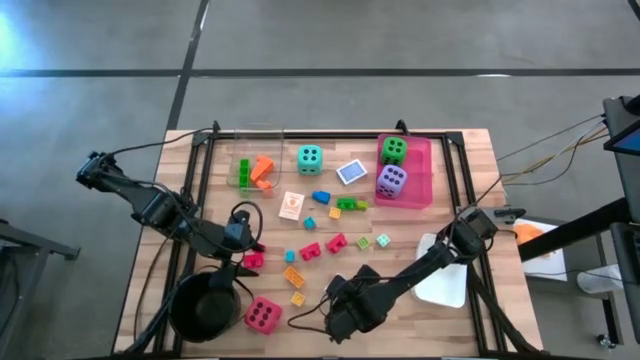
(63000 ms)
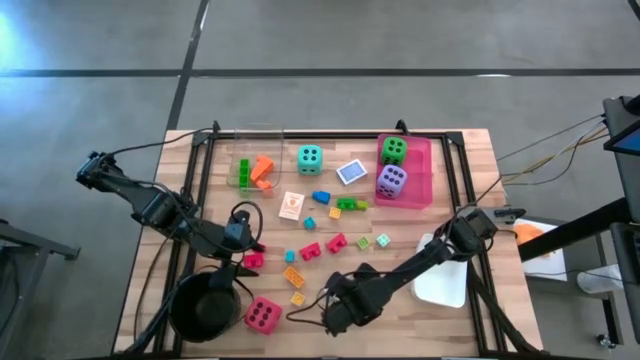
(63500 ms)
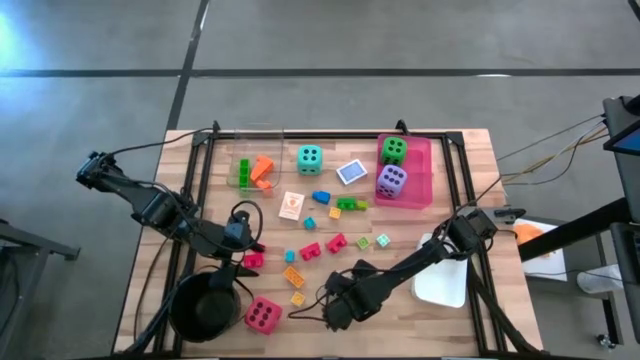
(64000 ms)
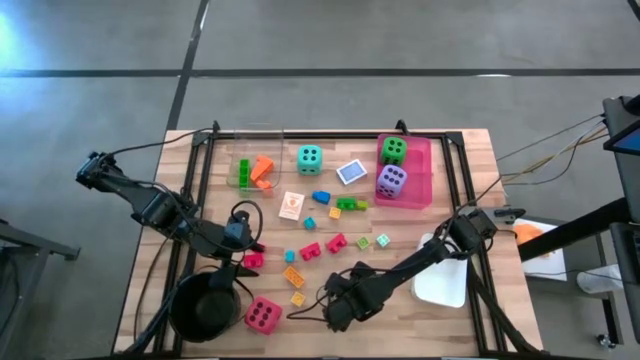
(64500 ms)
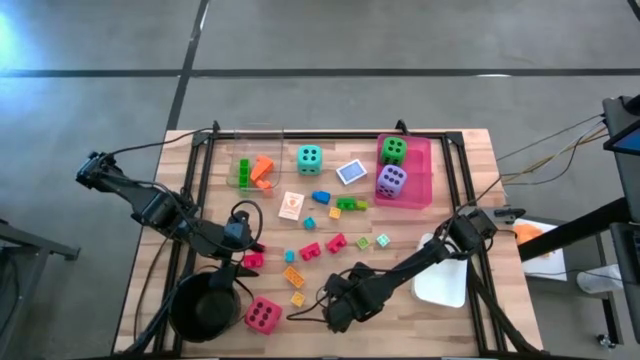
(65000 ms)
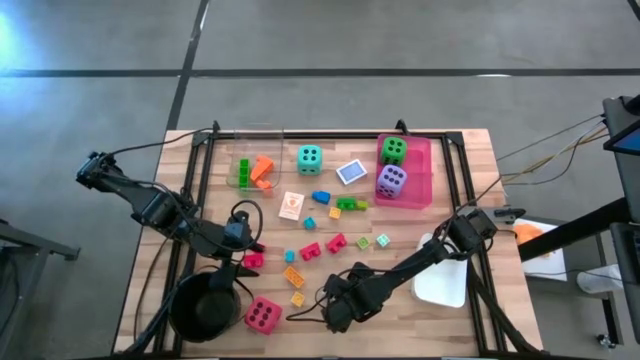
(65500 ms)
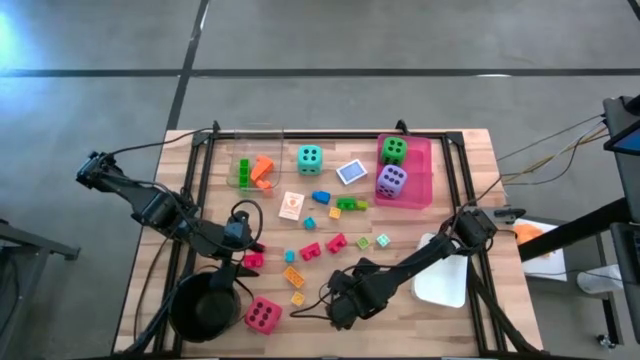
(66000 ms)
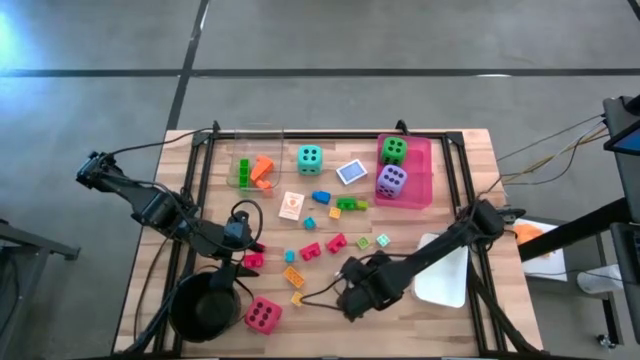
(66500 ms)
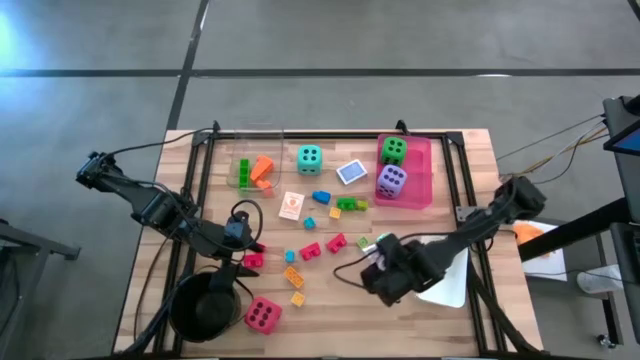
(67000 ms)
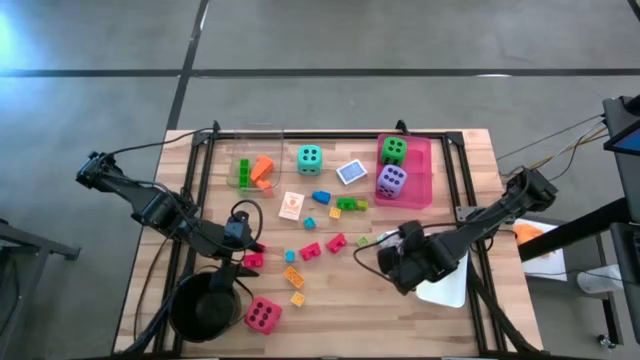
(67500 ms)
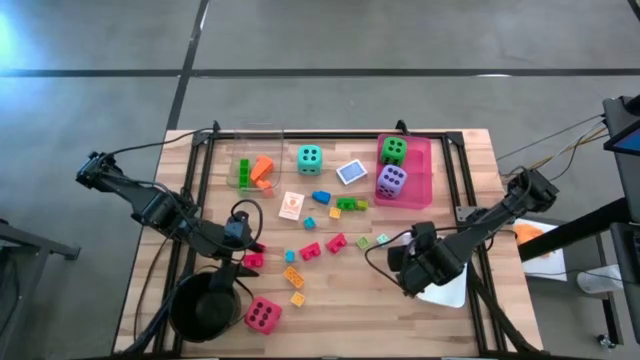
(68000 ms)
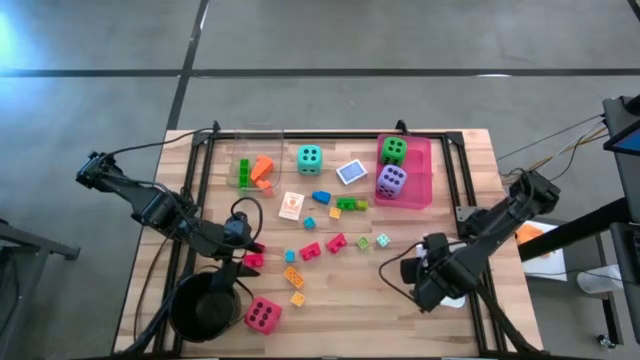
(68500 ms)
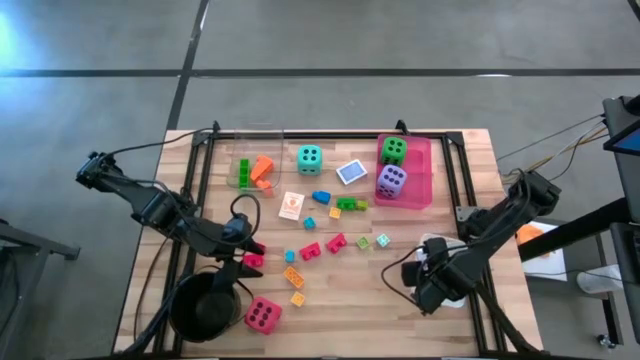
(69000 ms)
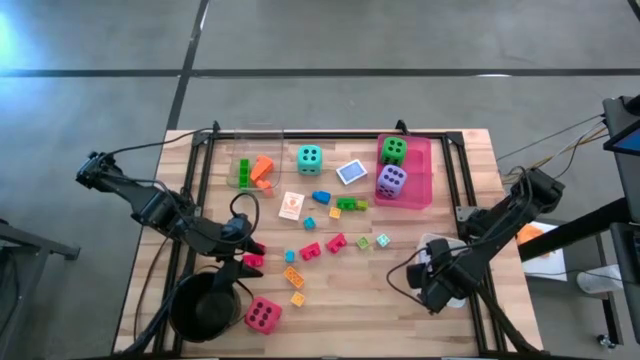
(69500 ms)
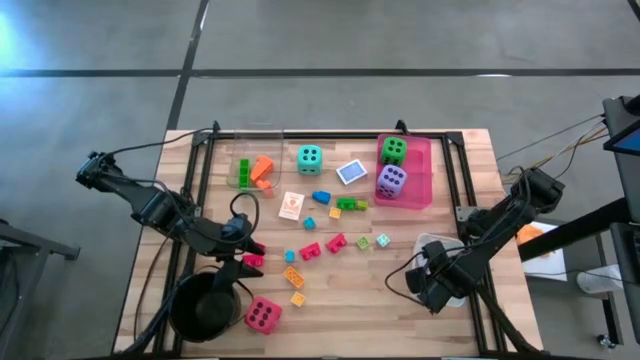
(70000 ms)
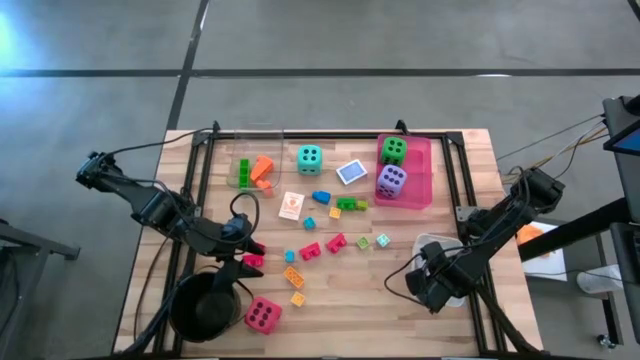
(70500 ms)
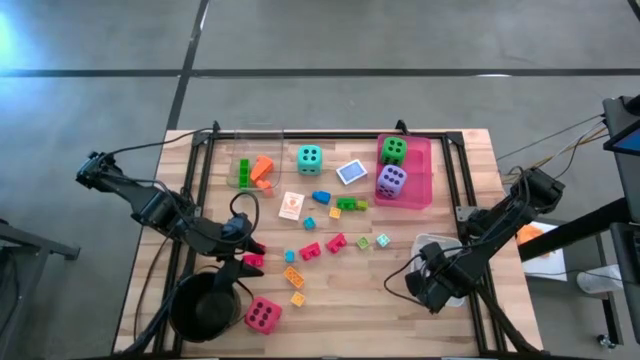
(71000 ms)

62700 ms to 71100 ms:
Task: Pick & Place Toys
Put the purple deck of cards into the white bin

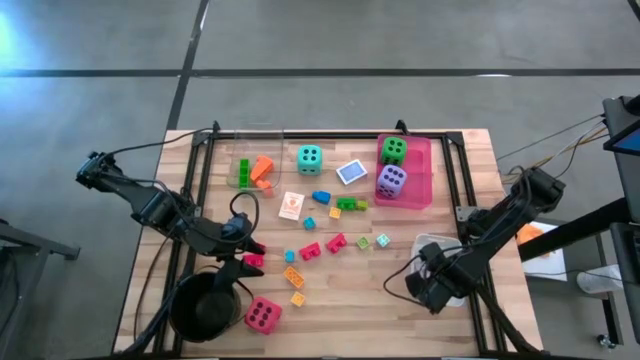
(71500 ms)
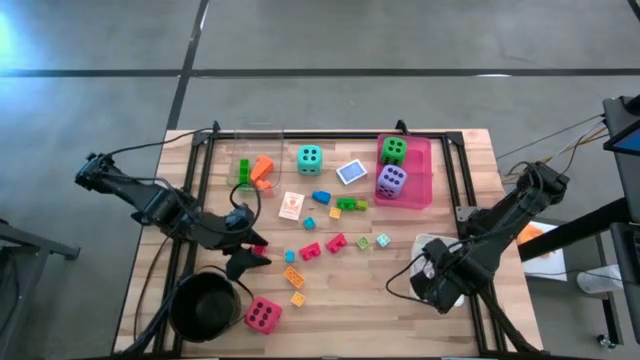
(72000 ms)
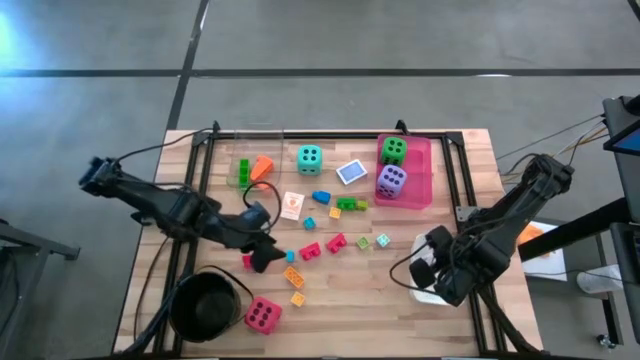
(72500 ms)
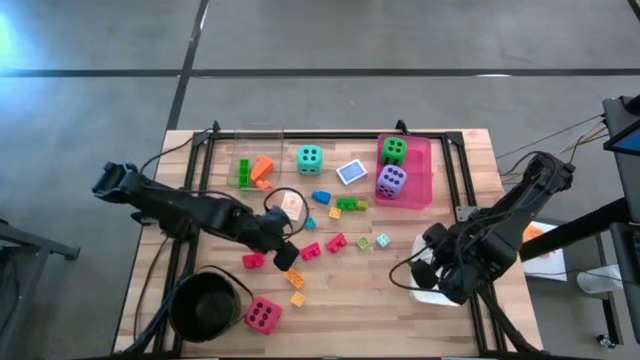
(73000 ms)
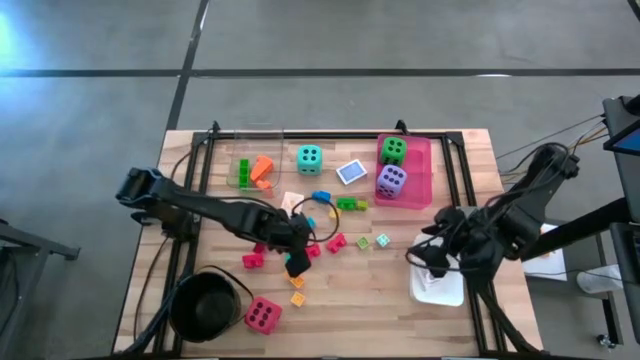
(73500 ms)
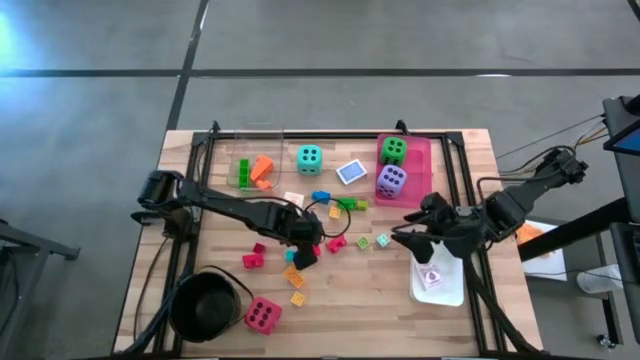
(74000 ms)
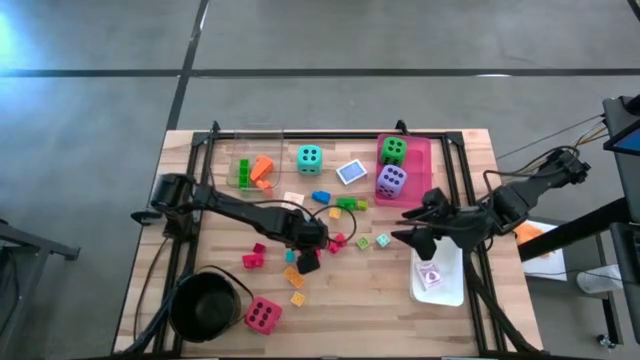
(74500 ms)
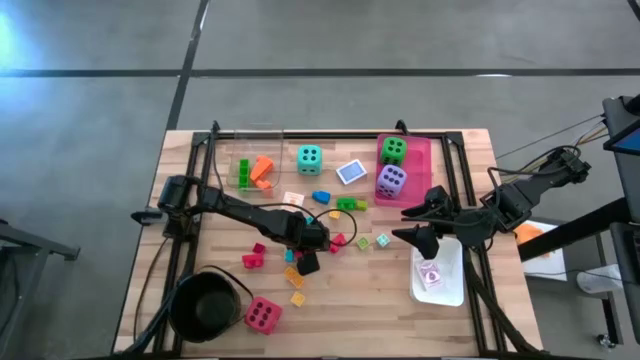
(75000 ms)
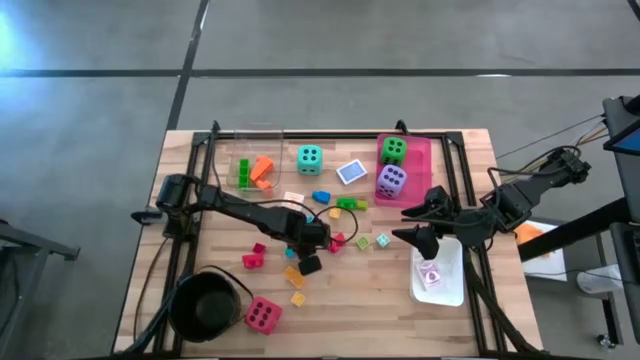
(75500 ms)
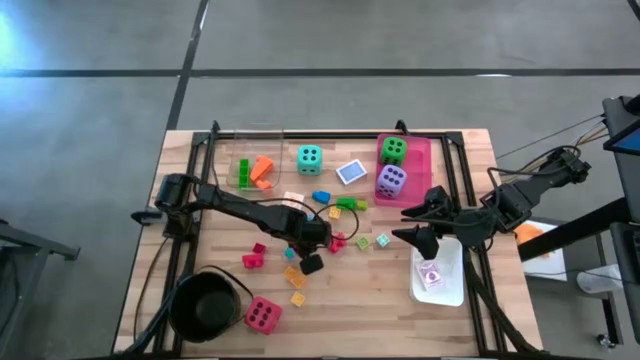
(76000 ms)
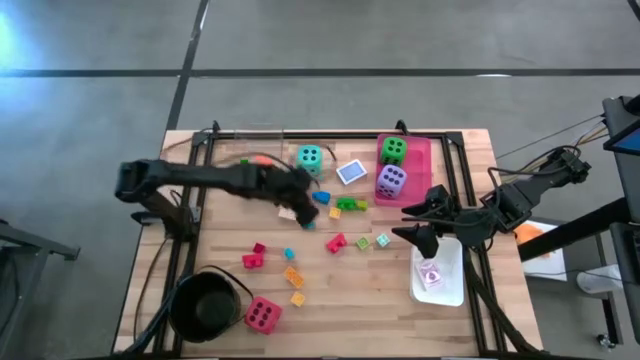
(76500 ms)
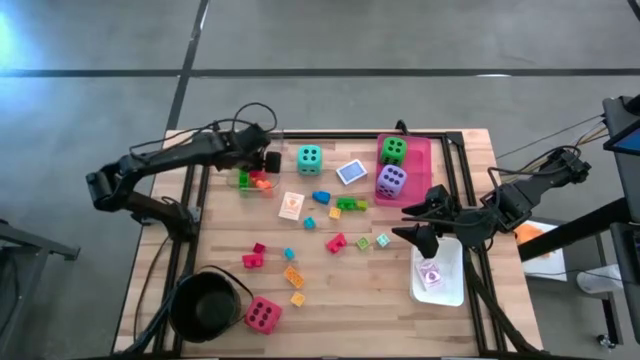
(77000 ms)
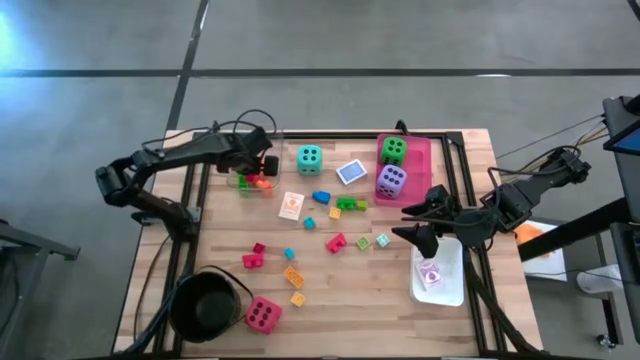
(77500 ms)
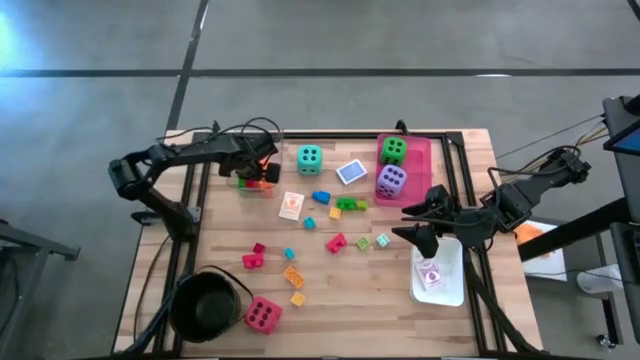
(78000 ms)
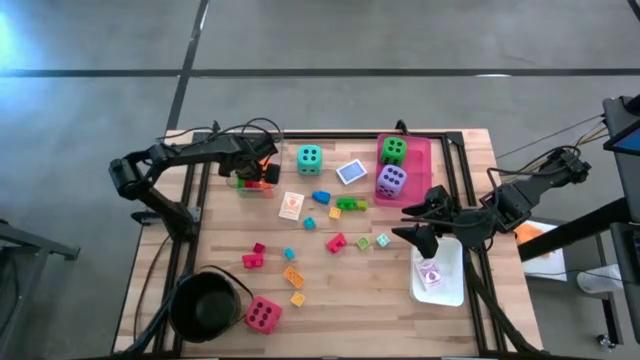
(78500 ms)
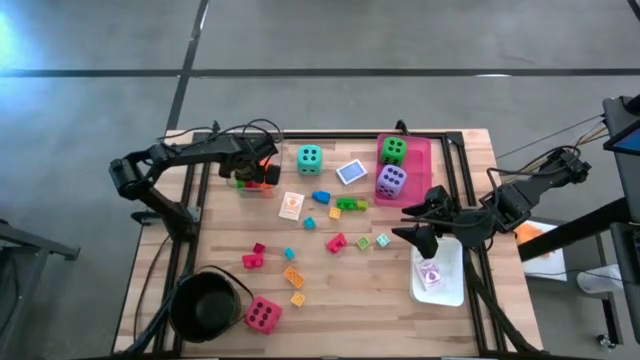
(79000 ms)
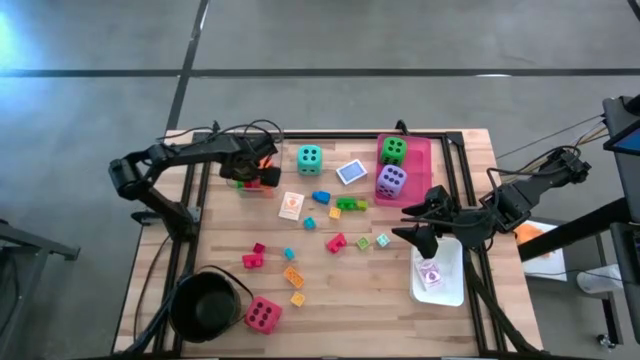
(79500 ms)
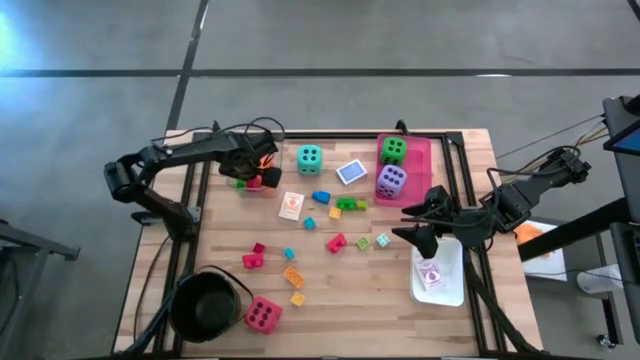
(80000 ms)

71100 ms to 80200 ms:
Put the red game piece into the transparent bin

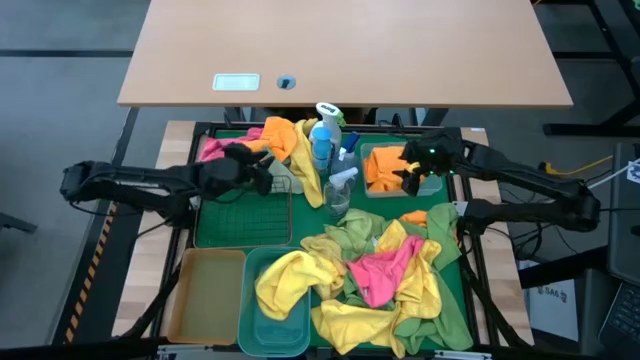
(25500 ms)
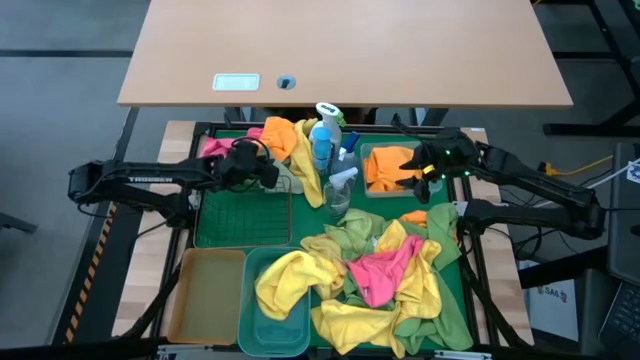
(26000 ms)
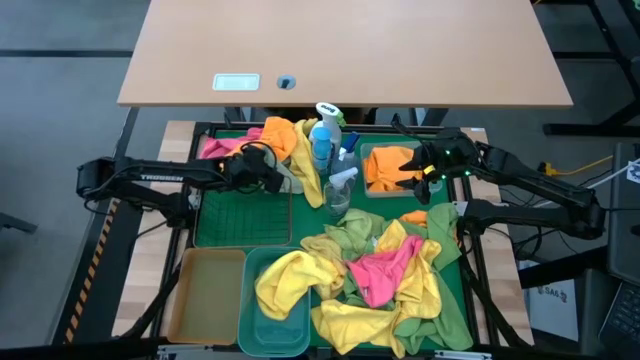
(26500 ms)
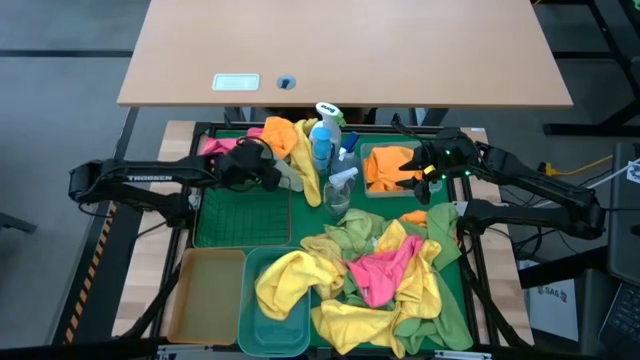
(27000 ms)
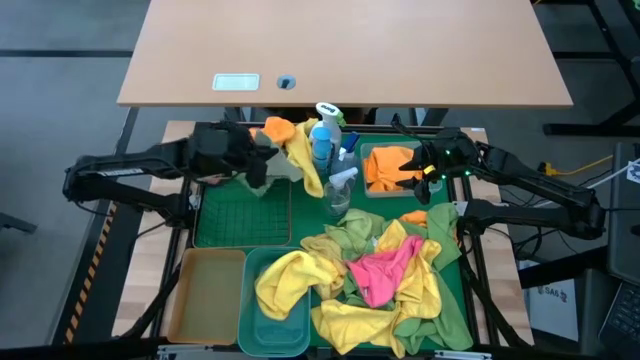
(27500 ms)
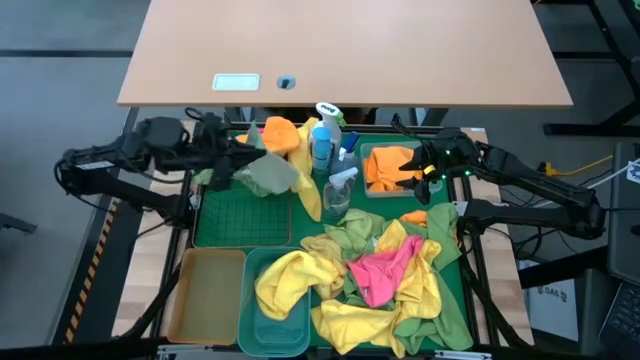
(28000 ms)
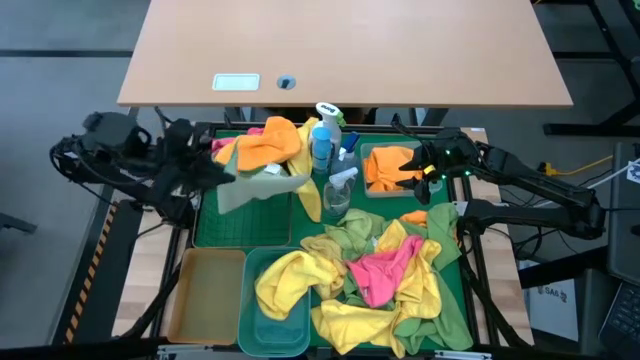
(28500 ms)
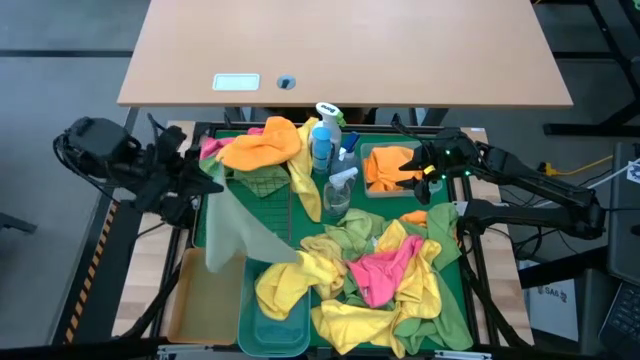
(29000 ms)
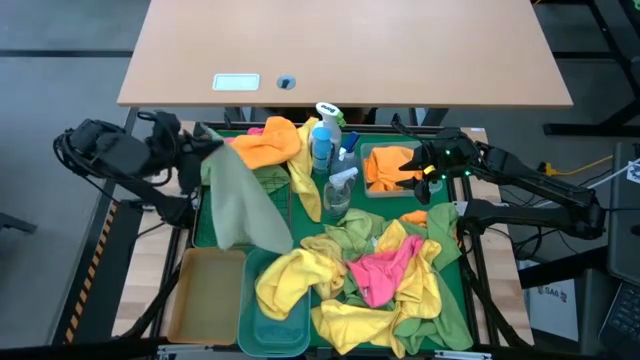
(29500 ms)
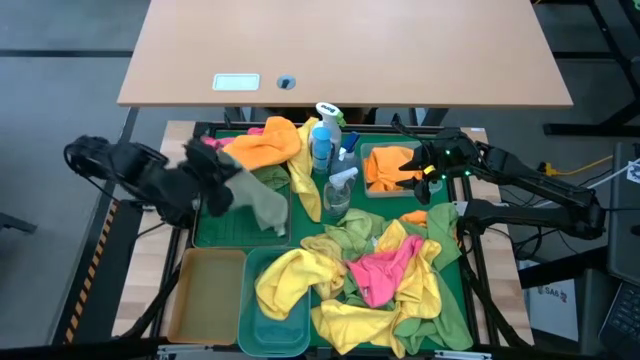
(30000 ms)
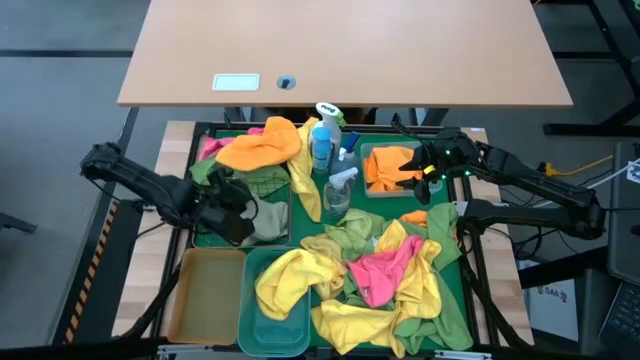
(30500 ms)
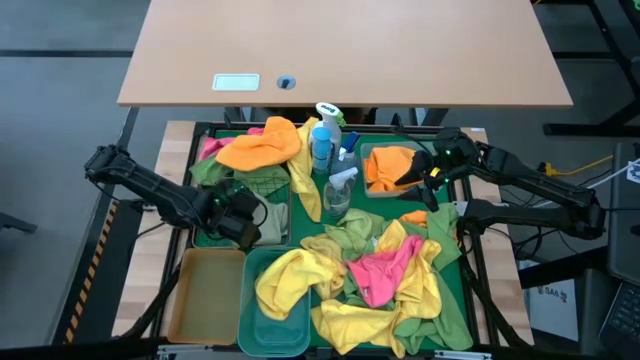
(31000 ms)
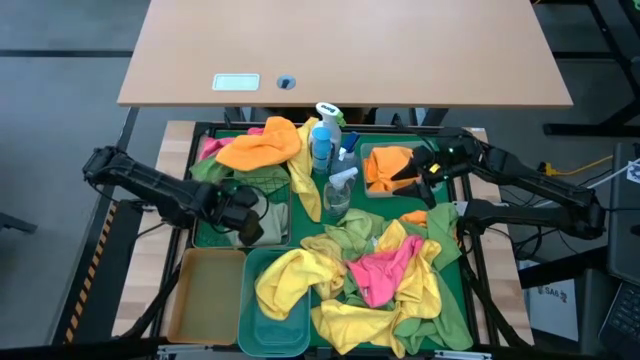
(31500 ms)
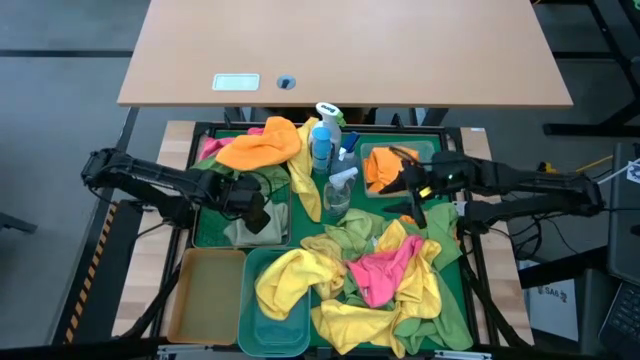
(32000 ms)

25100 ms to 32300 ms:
Task: Sort microfiber towel by color & place in baskets
Put the green towel into the wire basket
